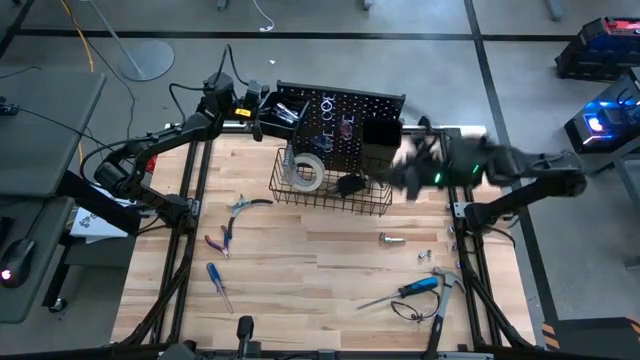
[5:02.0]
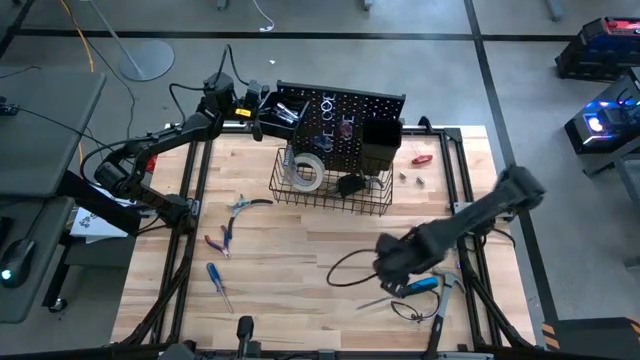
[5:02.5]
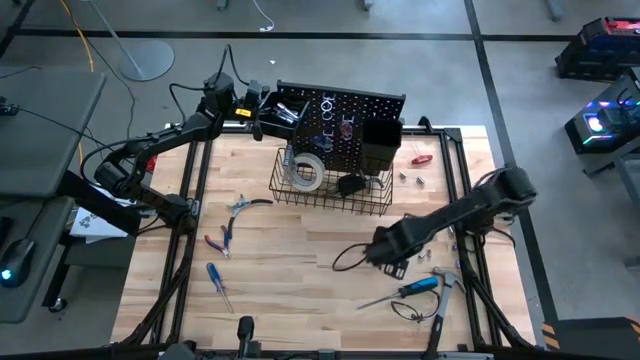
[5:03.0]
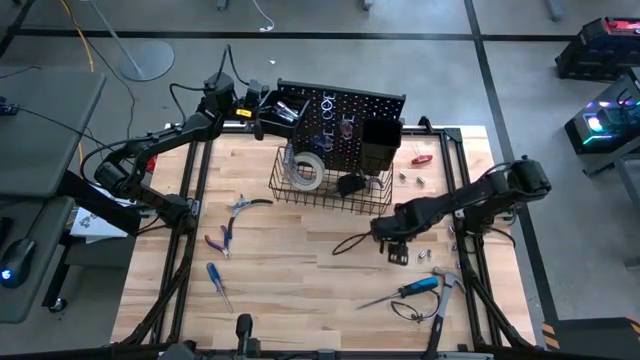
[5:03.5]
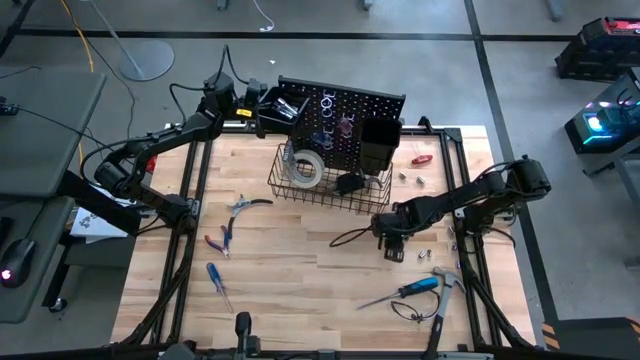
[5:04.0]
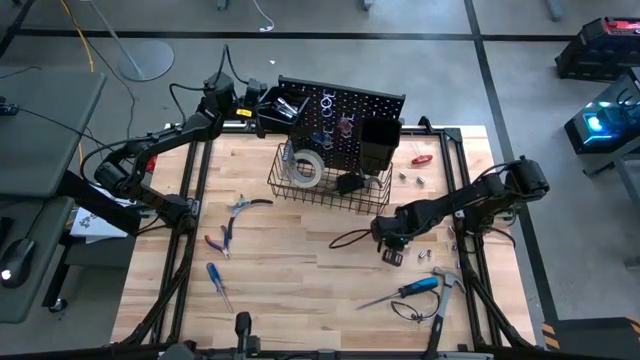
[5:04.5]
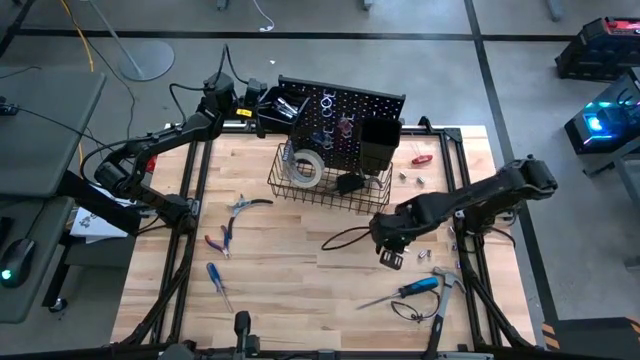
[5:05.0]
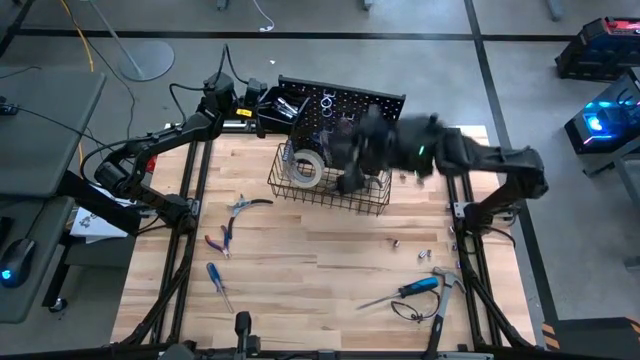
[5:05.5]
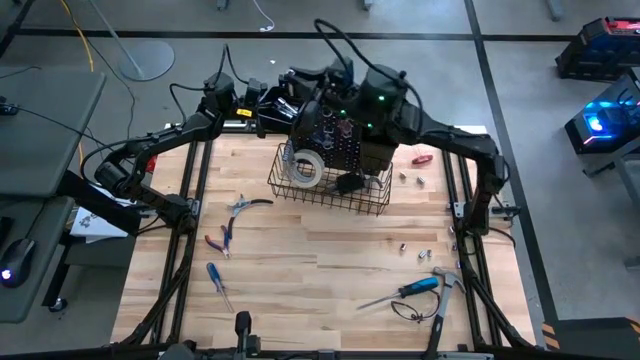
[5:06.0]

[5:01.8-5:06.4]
Task: Hang tools onto peg board
Put the extension bar in the left black bin on the pegboard

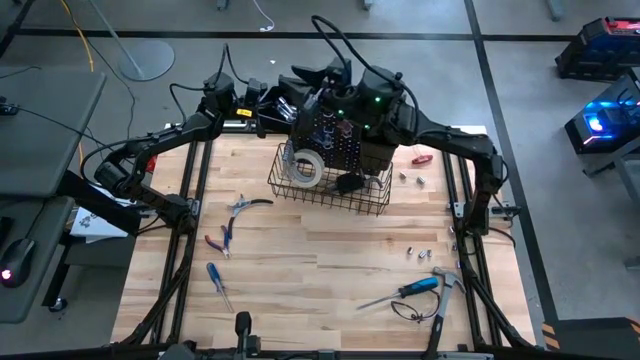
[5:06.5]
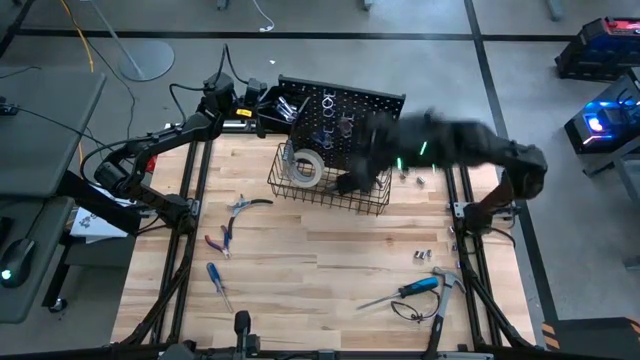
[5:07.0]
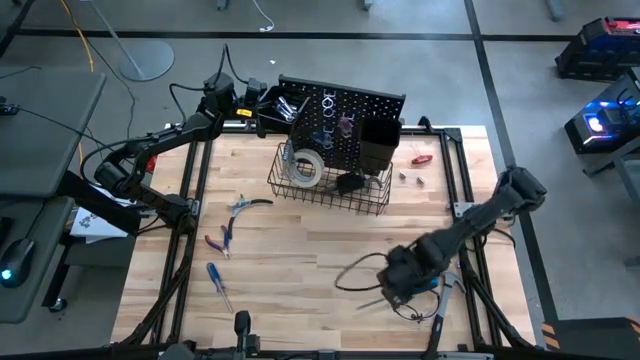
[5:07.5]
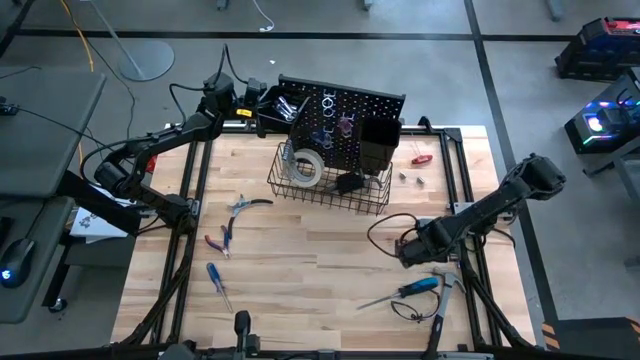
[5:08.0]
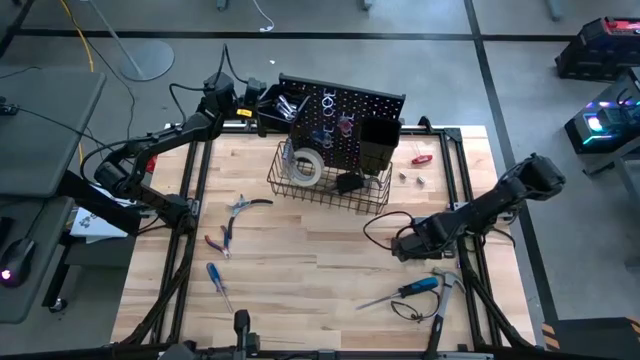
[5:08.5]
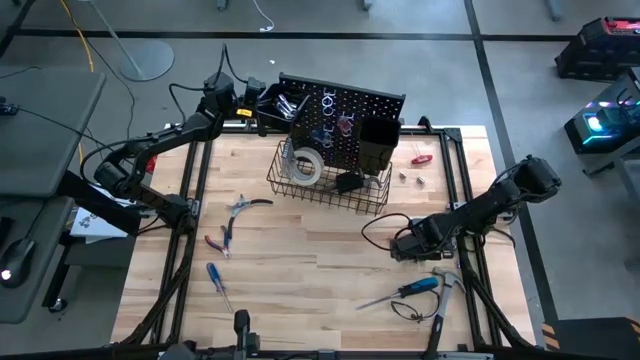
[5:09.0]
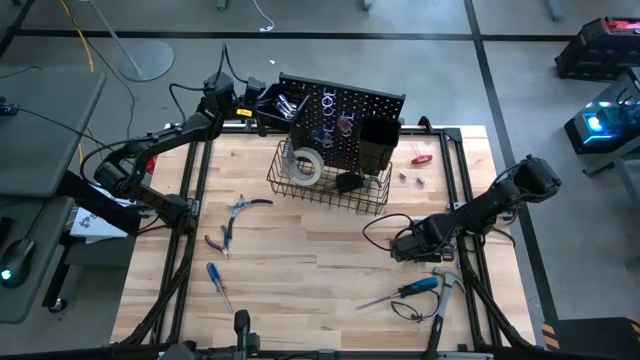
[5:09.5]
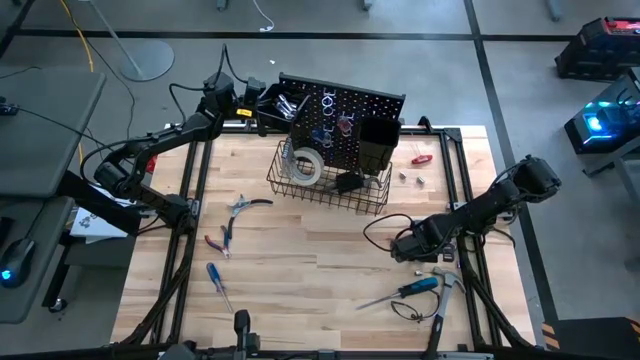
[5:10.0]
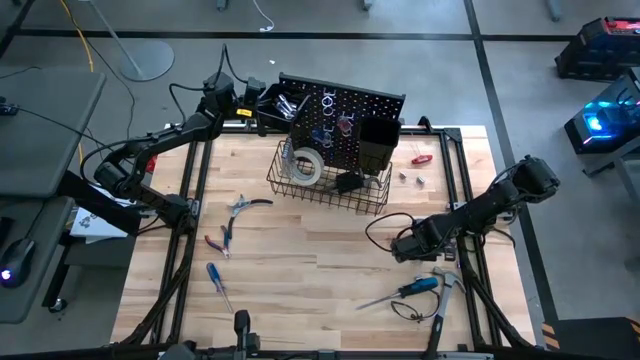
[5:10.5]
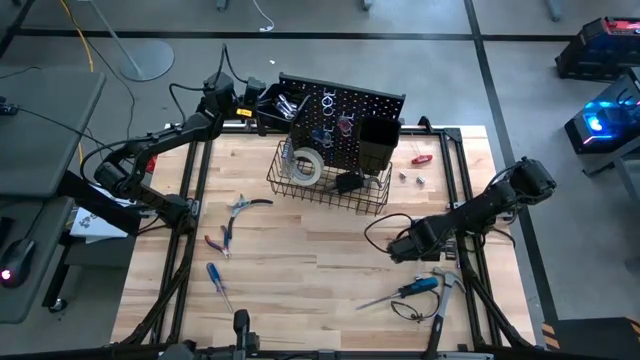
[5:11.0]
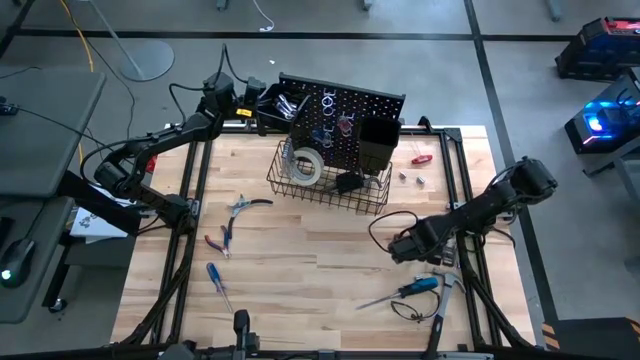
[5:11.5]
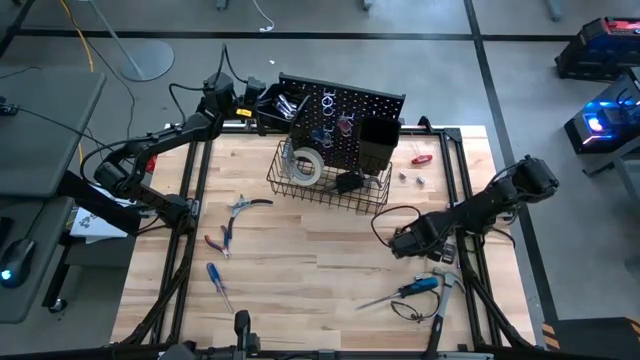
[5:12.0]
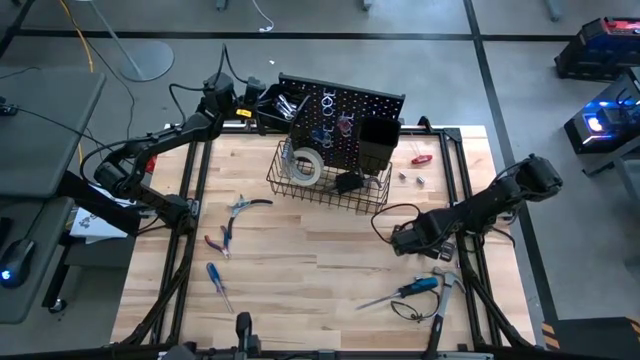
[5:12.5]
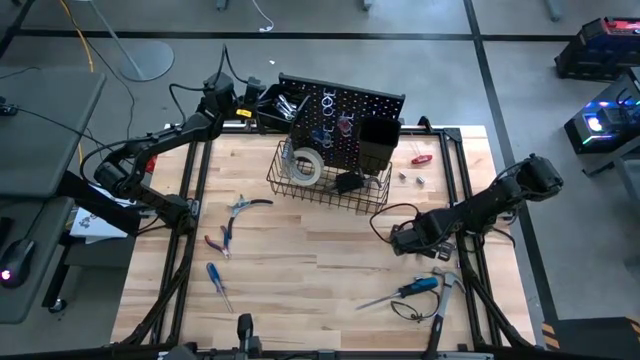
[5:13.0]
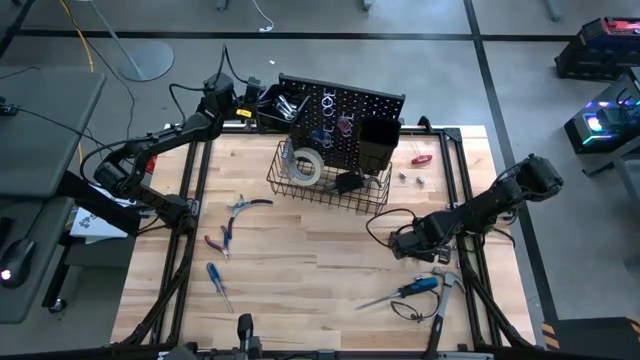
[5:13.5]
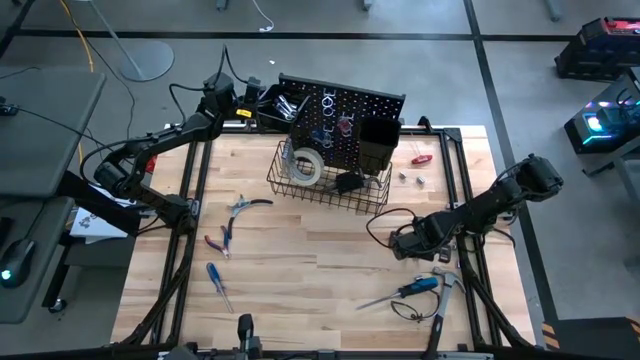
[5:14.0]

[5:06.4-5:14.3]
Put the socket in the left black bin on the pegboard

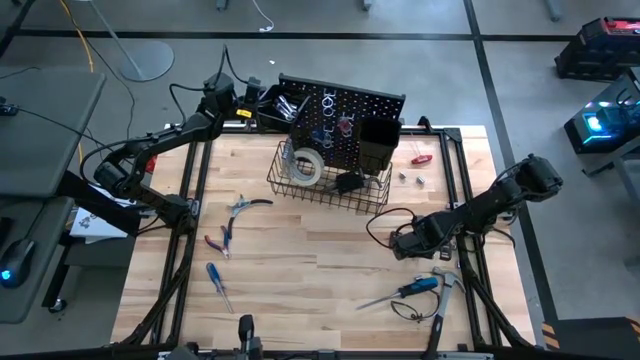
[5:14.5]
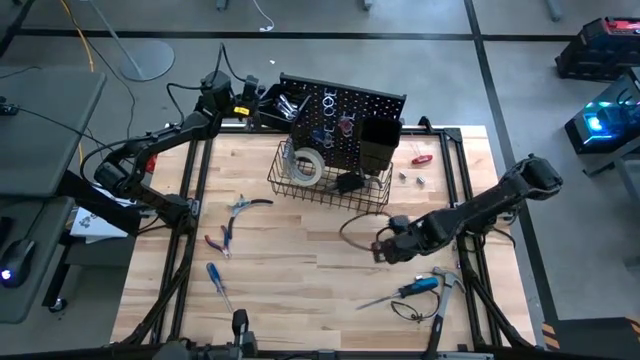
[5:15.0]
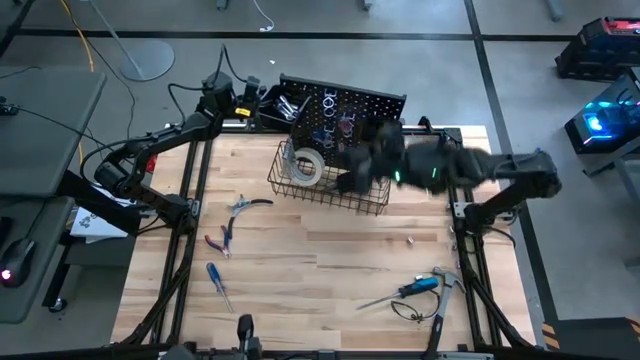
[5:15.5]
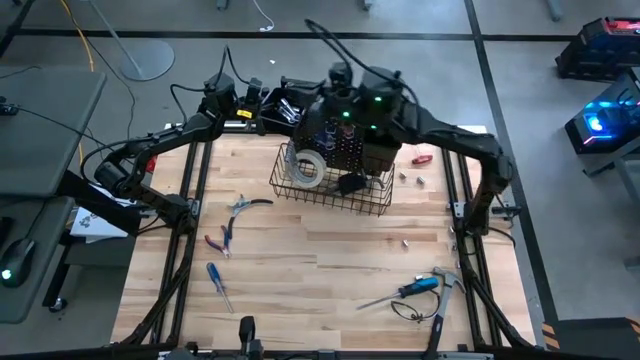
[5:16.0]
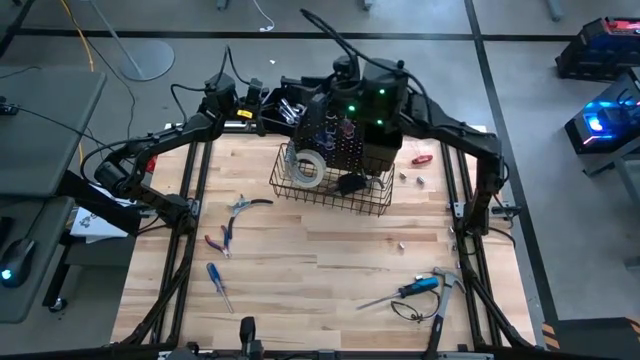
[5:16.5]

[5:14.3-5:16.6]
Put the socket in the left black bin on the pegboard

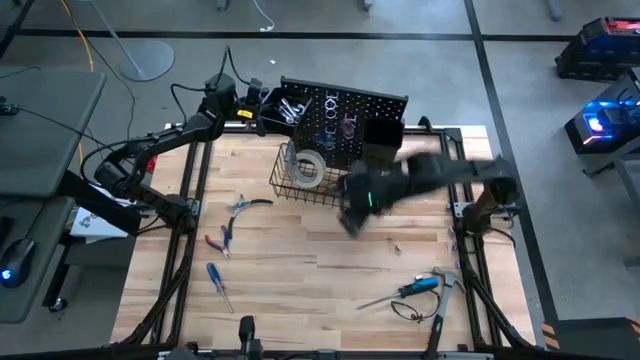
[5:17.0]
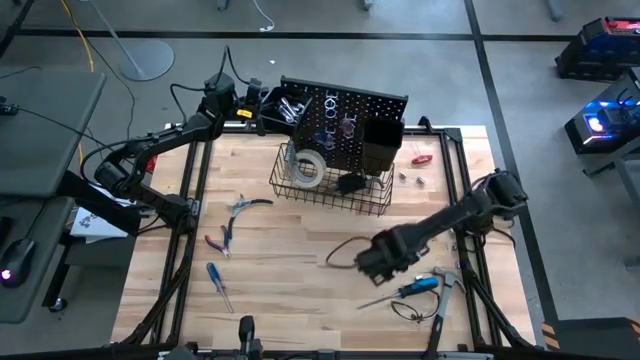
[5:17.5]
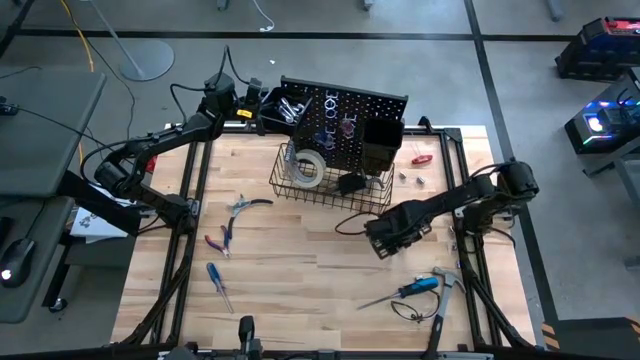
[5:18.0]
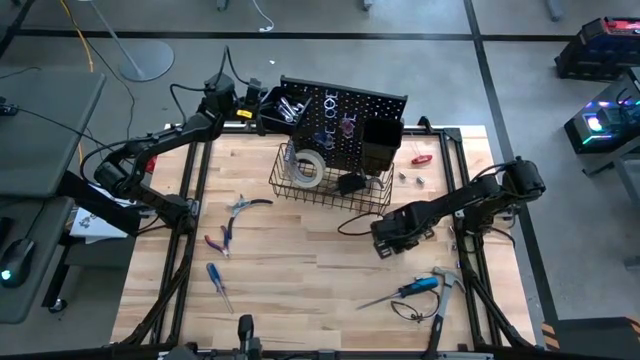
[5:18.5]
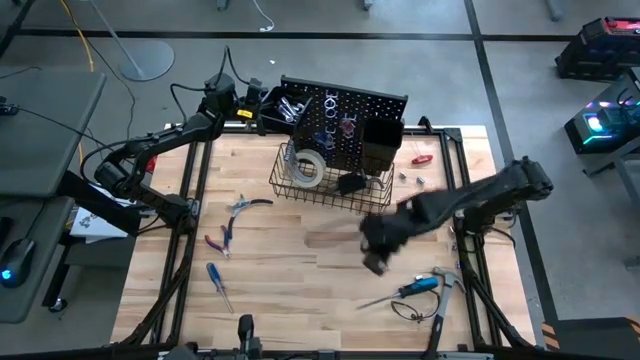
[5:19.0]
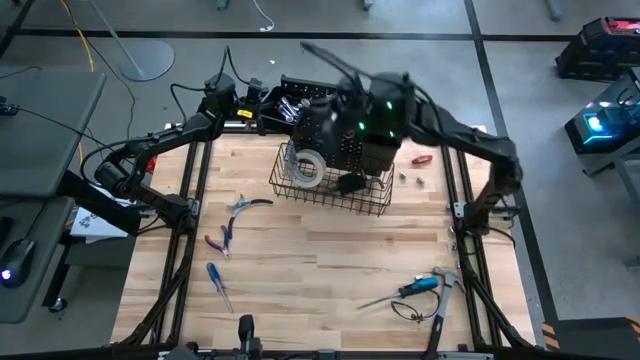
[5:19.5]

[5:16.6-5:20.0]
Put the socket in the left black bin on the pegboard

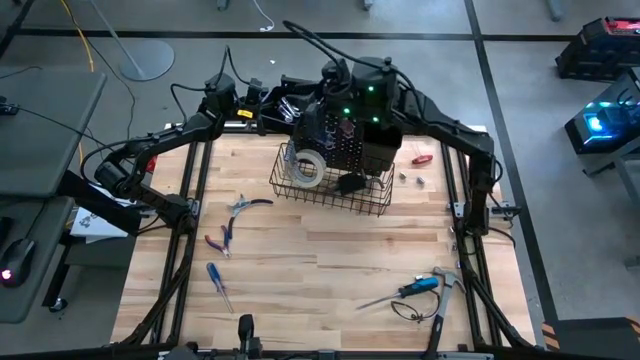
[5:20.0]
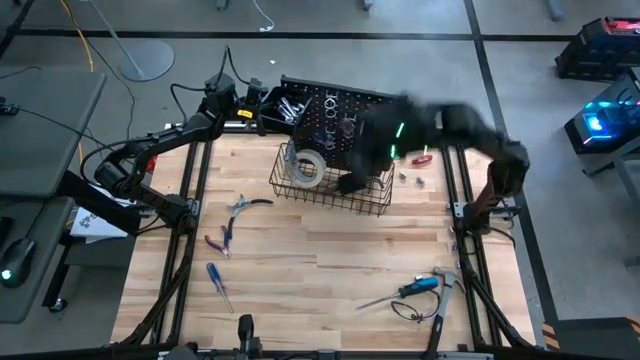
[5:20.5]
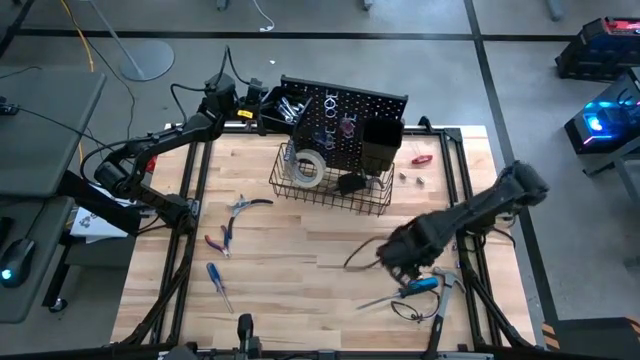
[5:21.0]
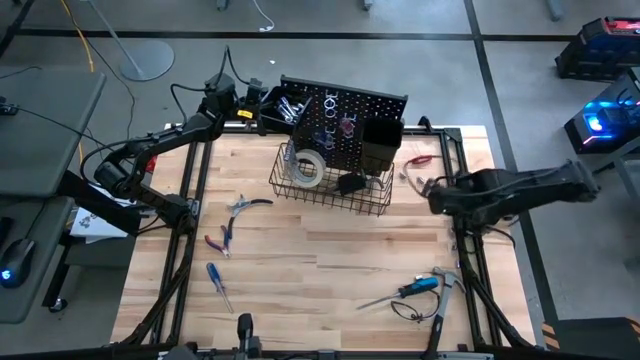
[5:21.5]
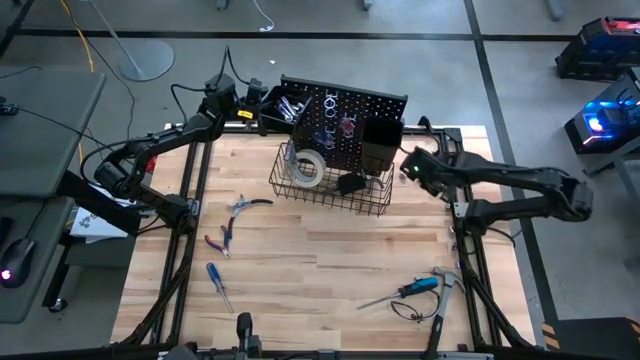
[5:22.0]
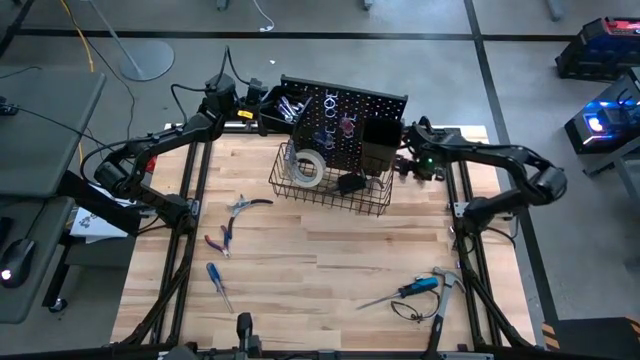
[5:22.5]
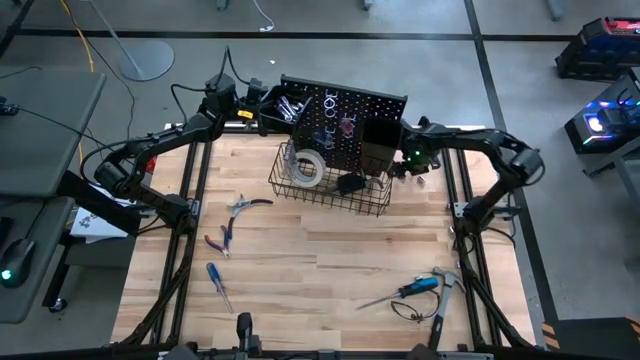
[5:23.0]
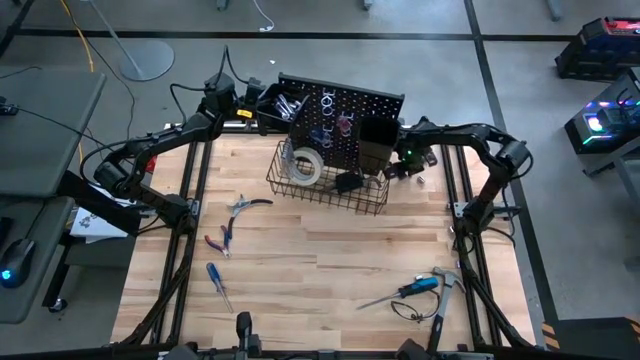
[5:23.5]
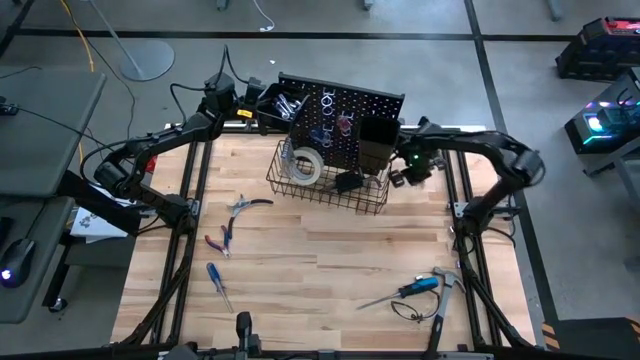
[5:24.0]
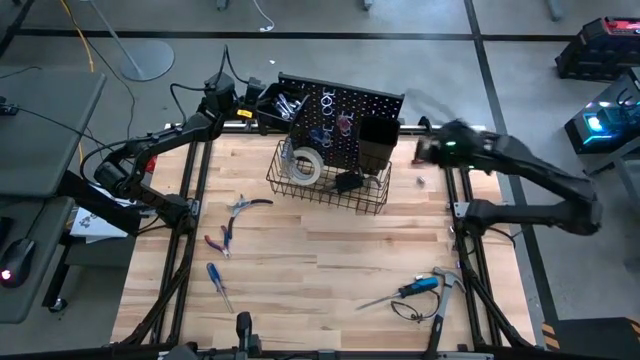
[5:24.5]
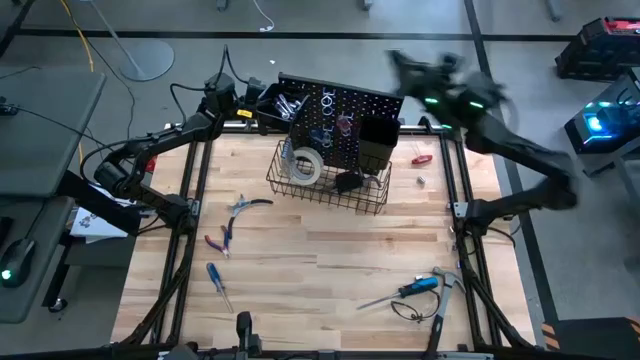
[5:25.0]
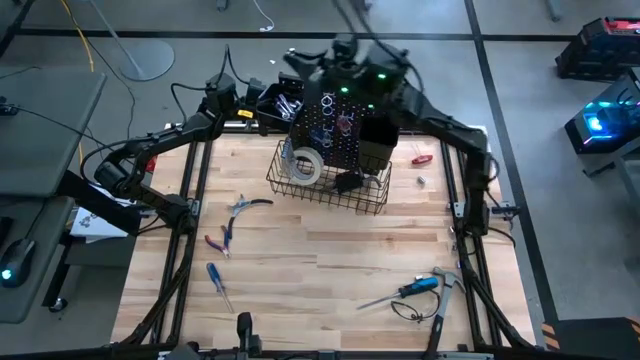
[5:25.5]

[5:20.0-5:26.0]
Put the socket in the left black bin on the pegboard
